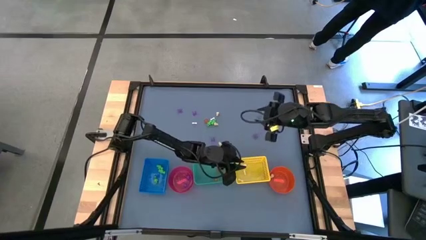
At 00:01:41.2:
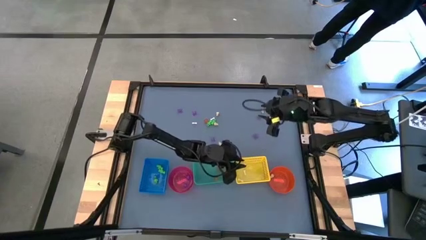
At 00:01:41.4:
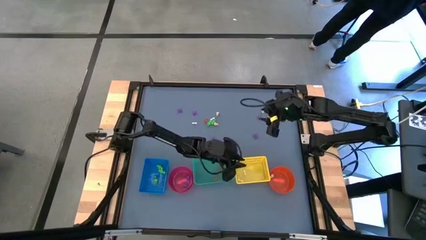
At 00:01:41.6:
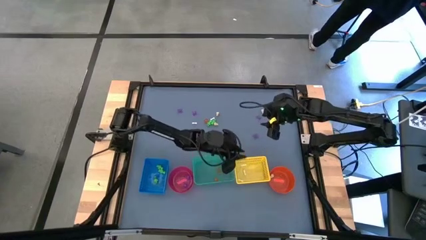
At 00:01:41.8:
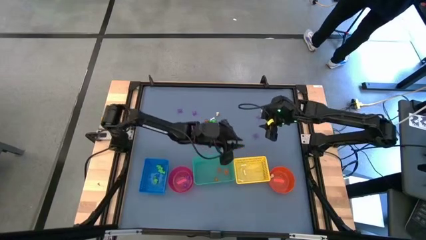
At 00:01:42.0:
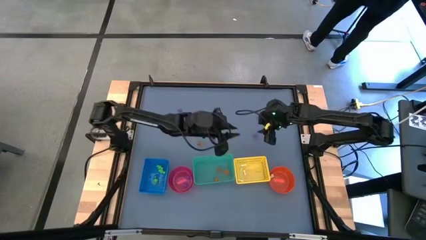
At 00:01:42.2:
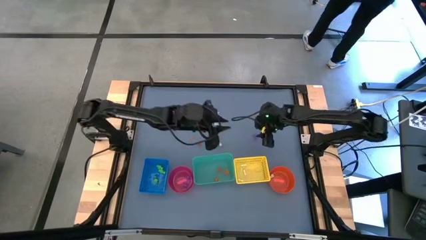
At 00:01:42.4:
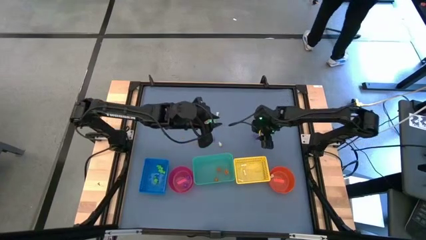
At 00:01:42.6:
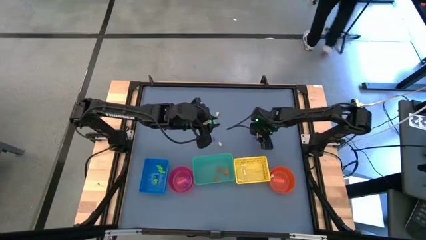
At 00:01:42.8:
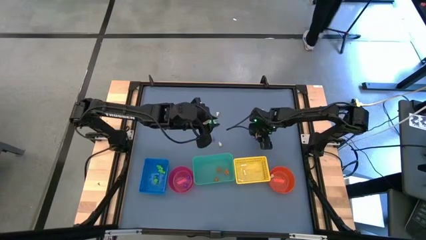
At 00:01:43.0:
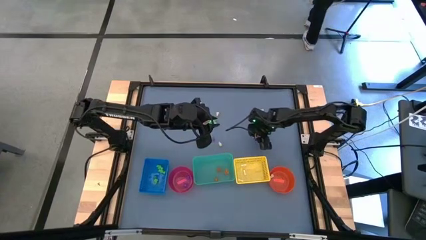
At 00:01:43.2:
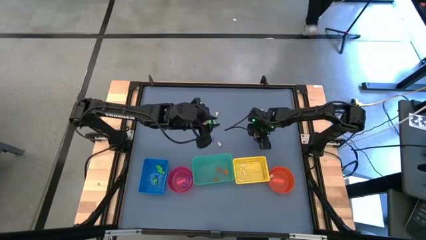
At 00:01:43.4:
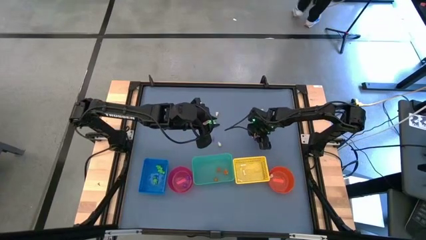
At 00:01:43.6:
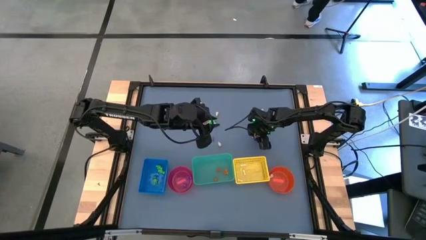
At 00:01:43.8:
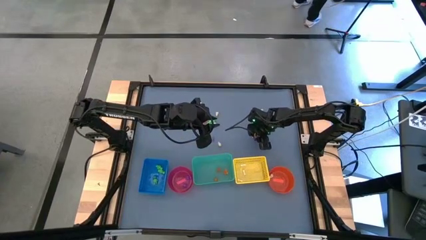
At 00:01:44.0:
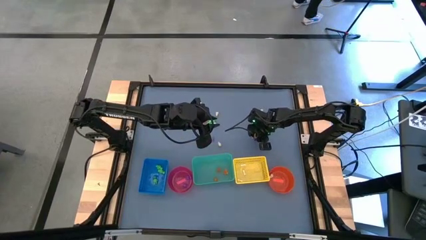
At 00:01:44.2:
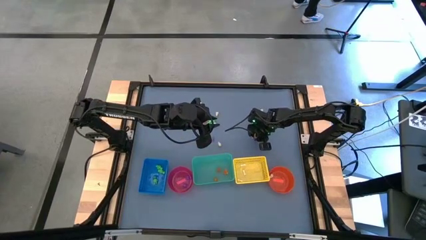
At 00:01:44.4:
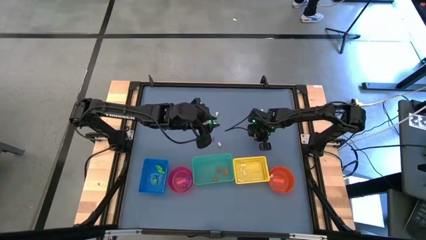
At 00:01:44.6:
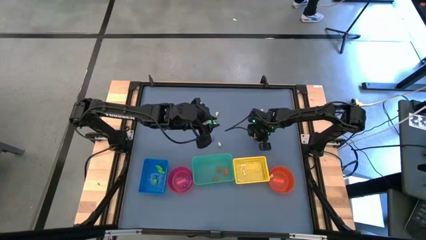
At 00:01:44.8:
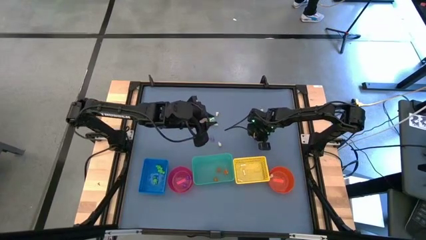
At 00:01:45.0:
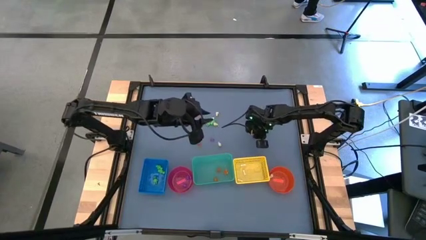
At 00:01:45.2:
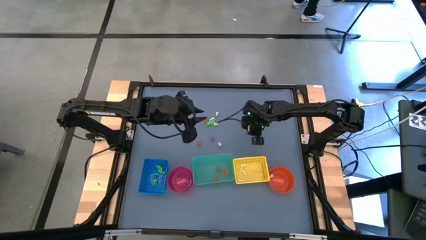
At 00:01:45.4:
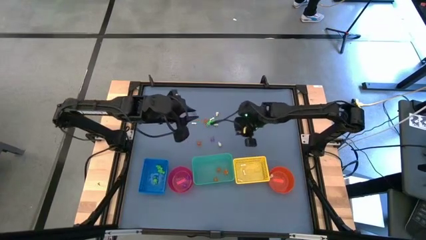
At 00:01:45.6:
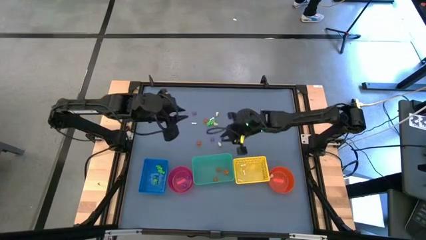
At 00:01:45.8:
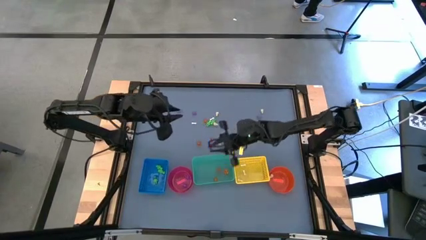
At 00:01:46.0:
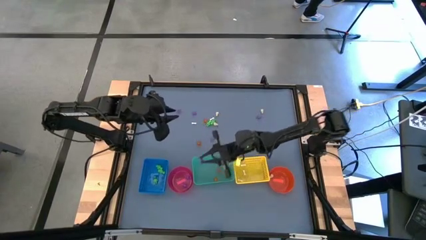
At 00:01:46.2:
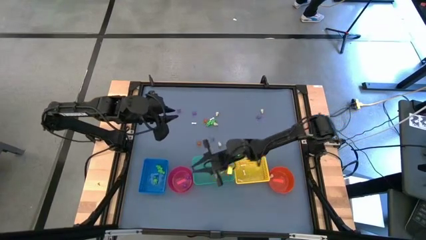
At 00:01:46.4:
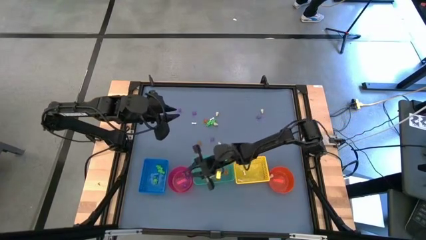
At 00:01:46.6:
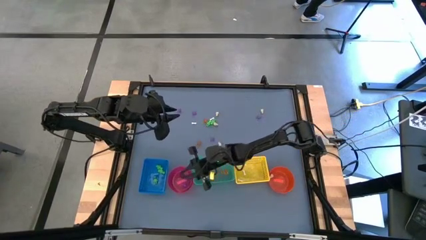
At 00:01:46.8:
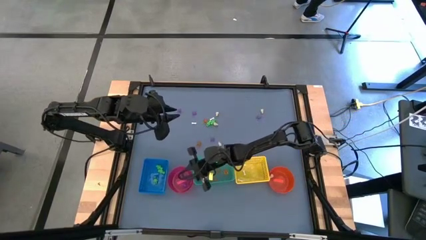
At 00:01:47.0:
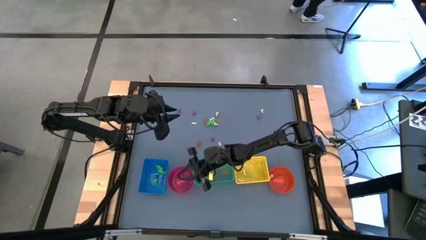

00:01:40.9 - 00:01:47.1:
Task: Sort Halloween decoration
Put the purple spider toy into the pink bin

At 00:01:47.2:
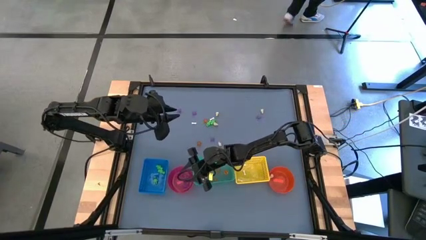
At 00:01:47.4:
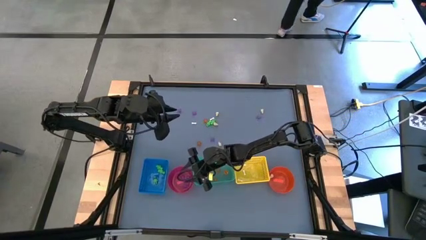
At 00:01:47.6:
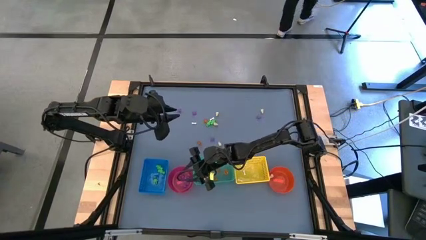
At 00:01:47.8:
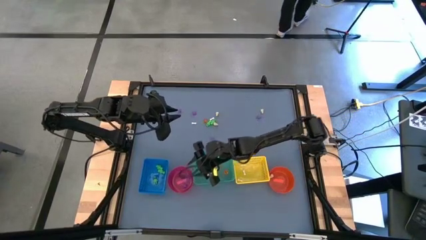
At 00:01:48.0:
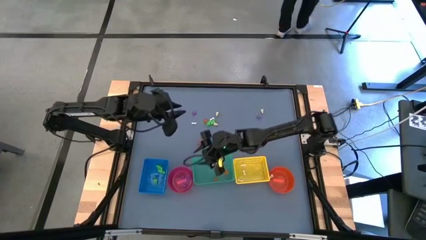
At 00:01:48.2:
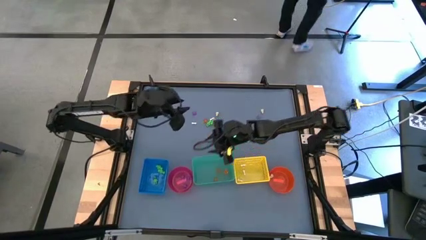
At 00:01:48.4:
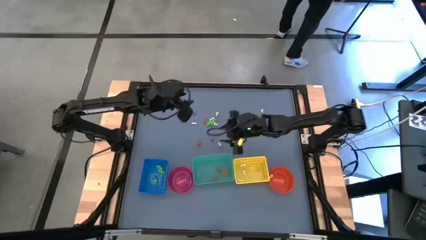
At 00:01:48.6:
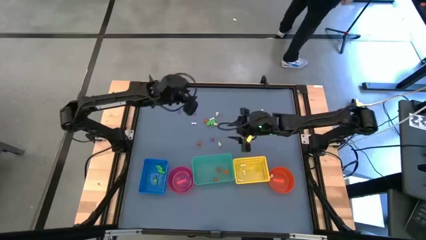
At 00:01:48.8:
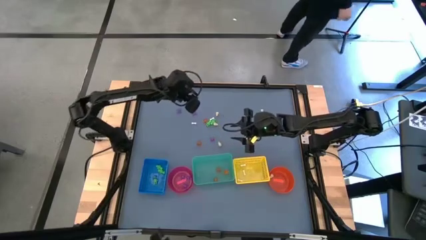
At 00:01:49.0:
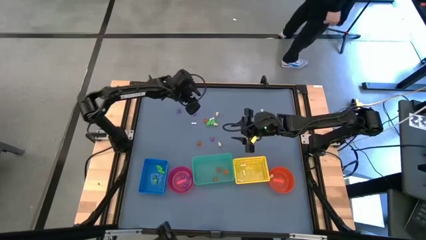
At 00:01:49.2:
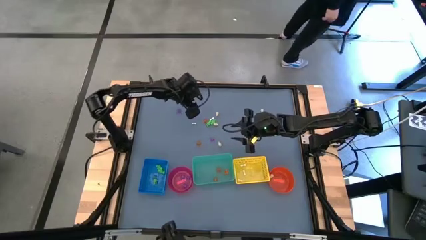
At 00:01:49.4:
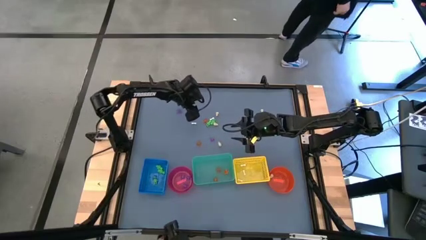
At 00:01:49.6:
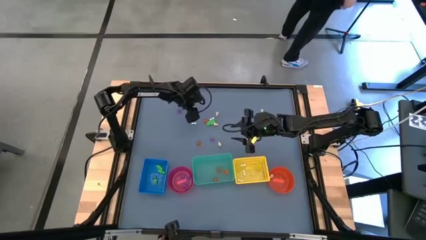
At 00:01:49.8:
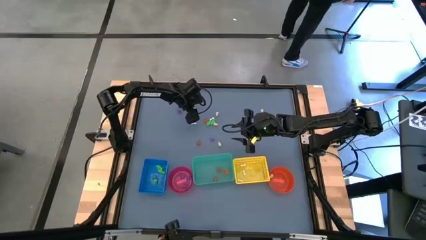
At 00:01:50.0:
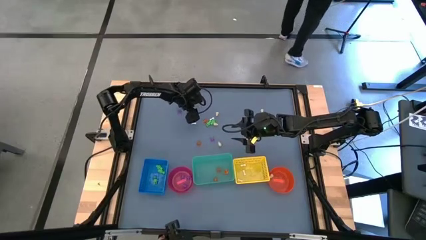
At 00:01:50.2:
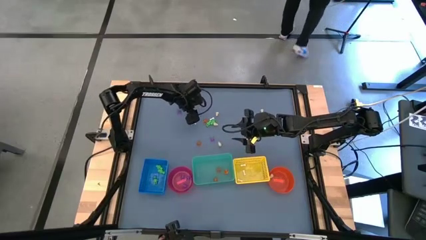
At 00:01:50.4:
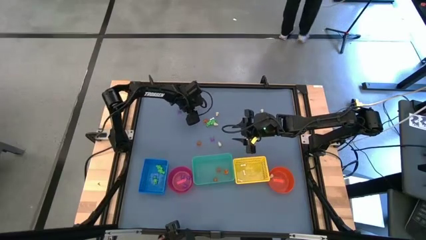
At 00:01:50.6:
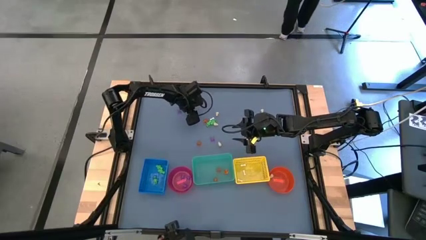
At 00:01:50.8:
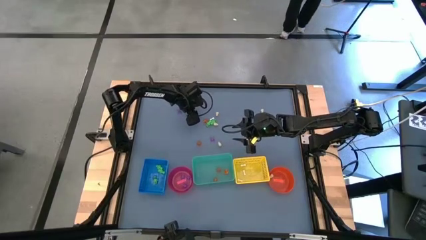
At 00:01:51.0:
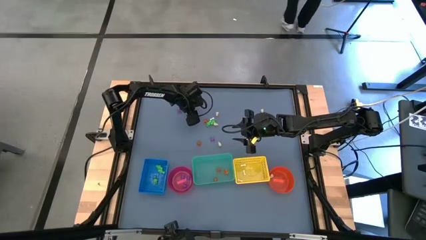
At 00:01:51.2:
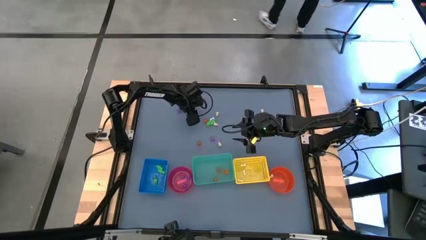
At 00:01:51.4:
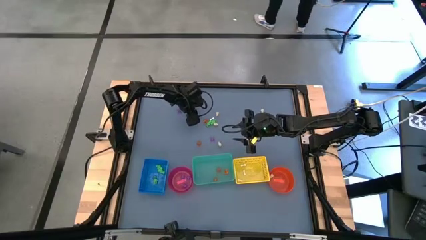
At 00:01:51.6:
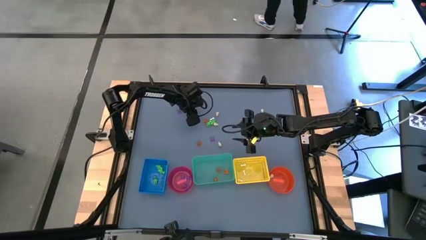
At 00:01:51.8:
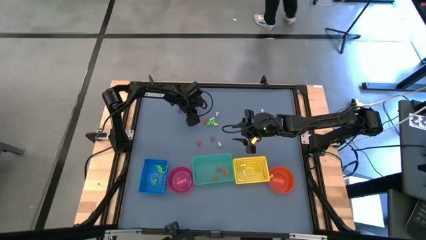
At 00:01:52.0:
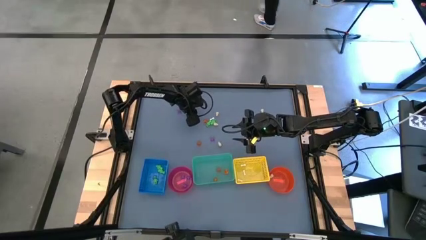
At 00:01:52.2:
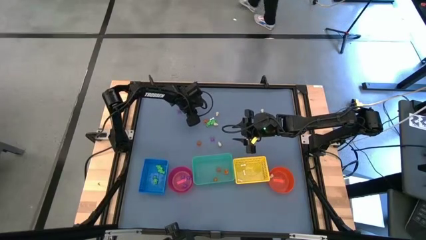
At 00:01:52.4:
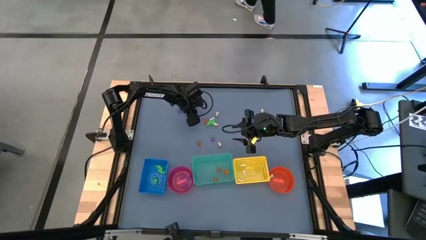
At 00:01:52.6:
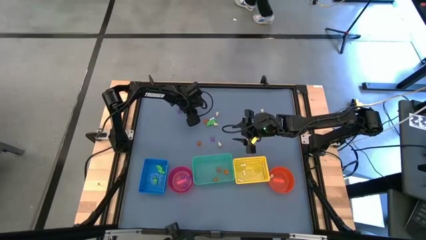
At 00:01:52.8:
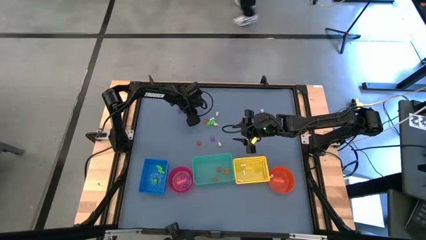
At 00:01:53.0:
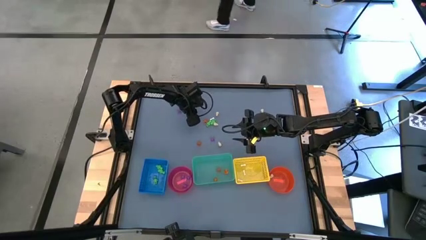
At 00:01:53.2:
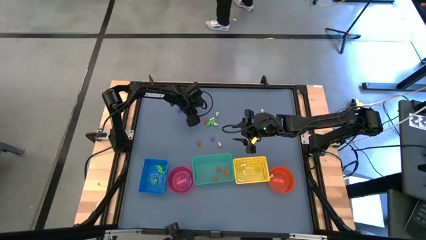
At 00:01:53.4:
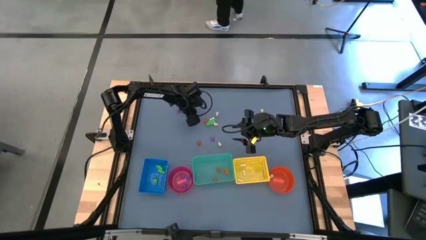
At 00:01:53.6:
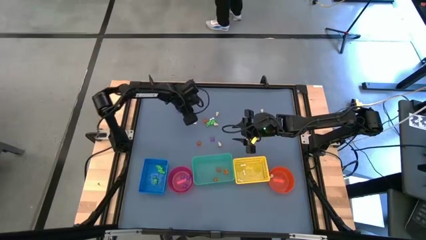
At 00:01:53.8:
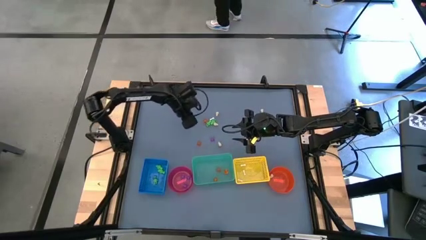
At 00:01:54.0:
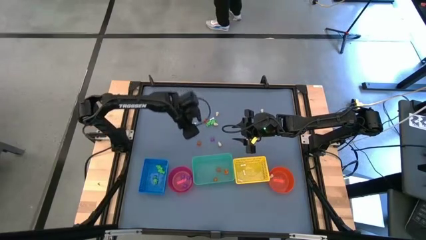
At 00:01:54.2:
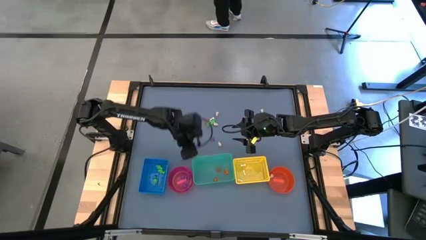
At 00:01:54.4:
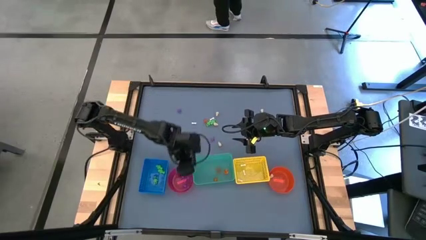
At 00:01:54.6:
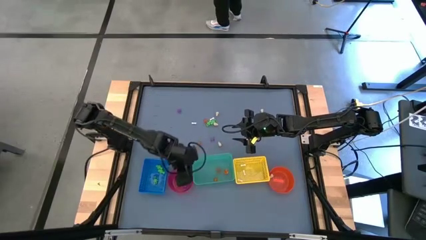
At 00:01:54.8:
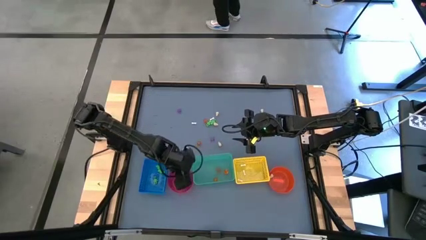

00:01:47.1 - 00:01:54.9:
Put the purple spider toy into the pink bin

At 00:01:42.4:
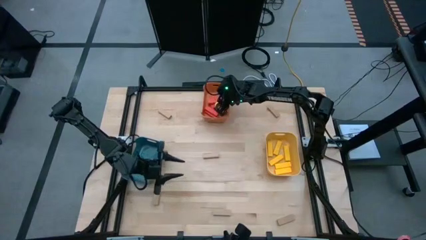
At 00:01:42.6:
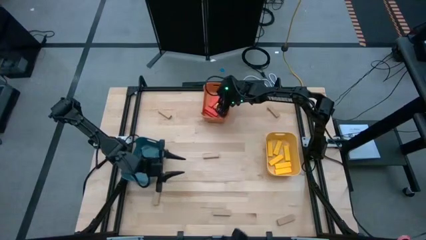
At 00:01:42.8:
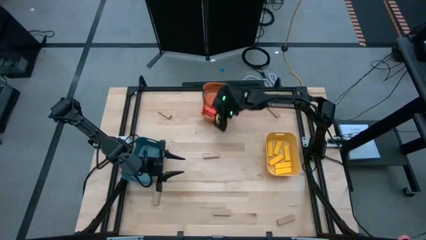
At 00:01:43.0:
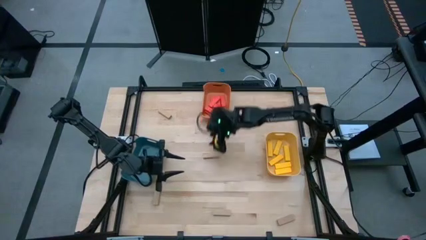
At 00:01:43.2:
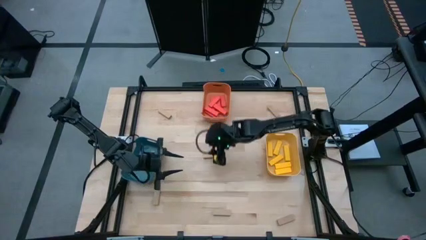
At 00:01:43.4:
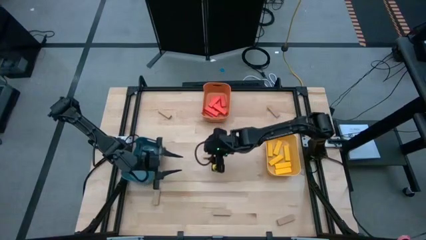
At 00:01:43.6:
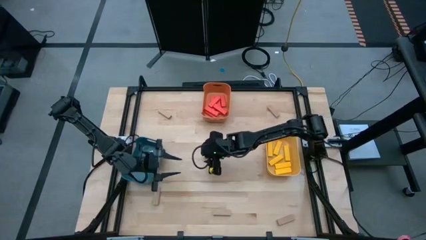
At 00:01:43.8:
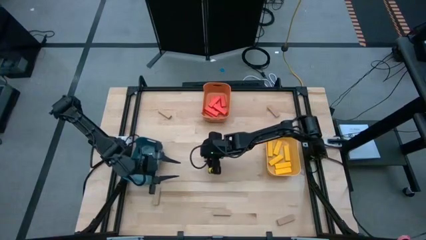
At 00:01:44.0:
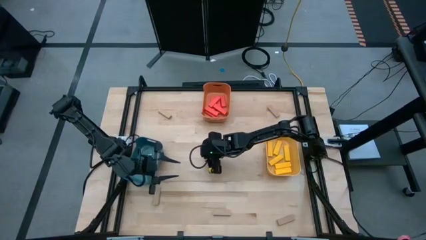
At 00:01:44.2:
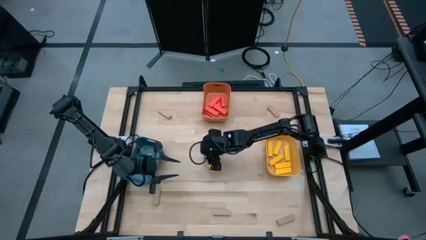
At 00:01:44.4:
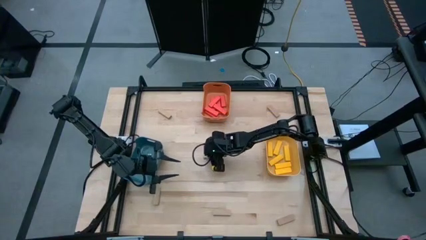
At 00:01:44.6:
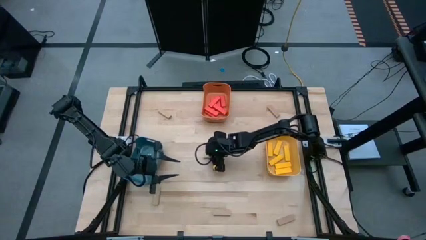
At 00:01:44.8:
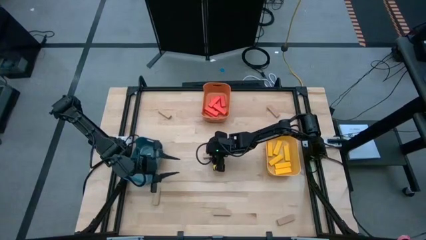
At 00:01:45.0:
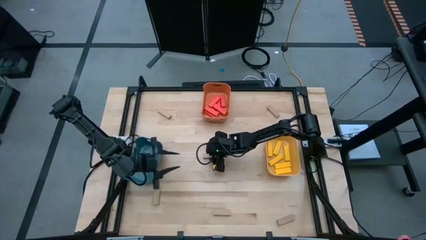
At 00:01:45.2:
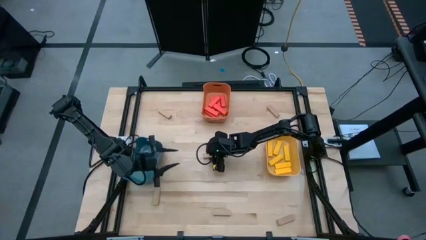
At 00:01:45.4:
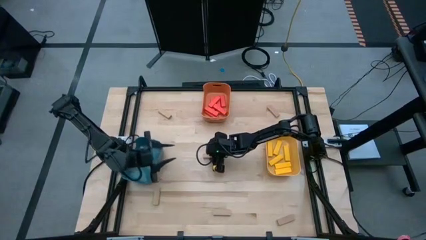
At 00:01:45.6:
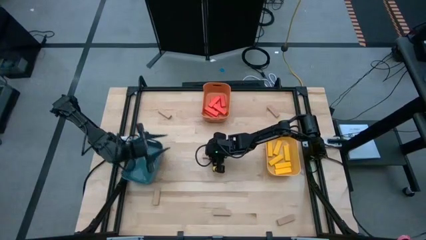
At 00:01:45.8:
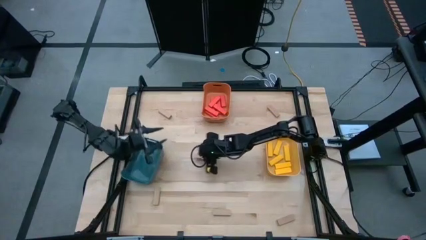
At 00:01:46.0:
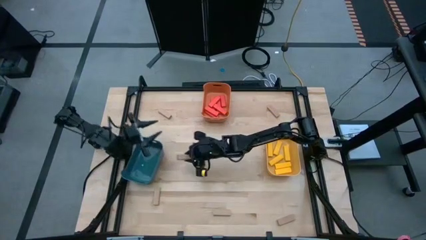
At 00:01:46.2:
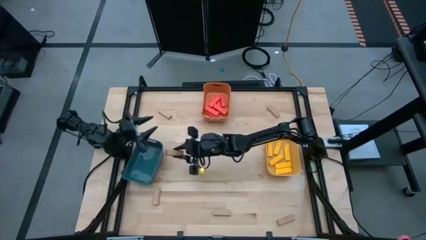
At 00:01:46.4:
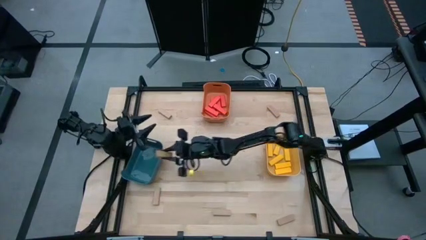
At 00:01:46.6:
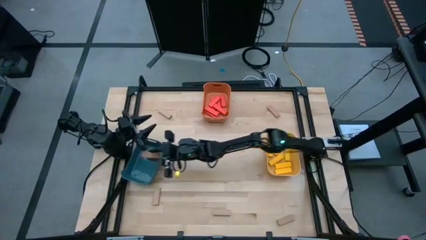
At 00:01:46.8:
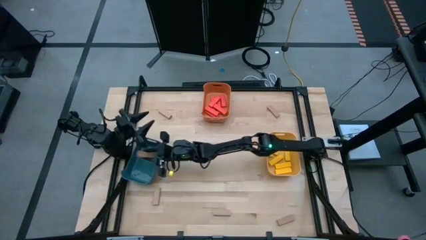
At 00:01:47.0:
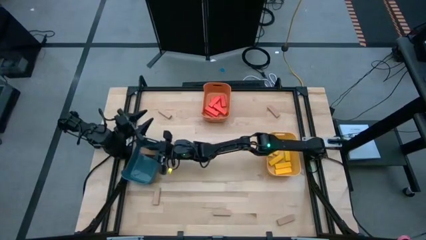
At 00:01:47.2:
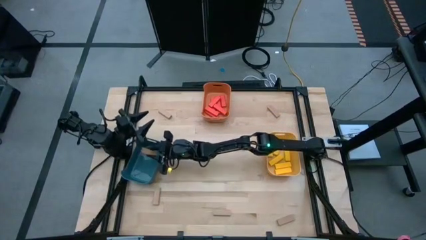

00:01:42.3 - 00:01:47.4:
Task: Sort blocks
Put the center brown block into the blue bin
